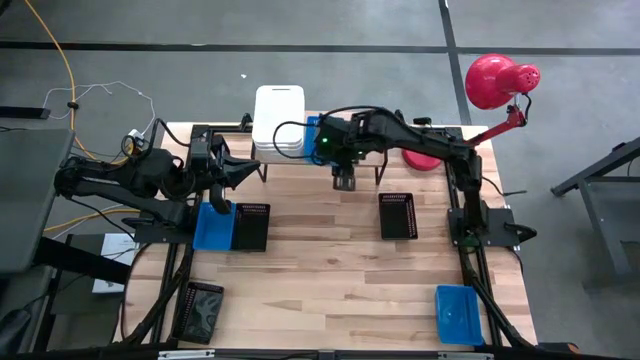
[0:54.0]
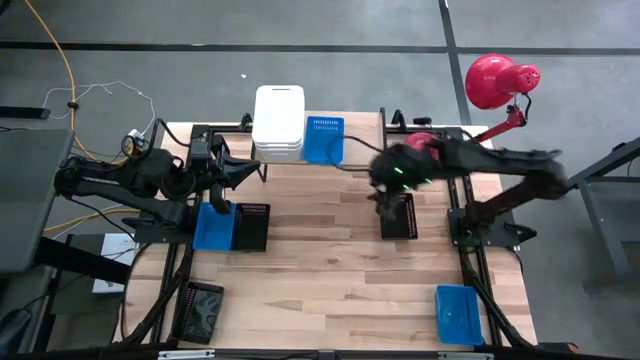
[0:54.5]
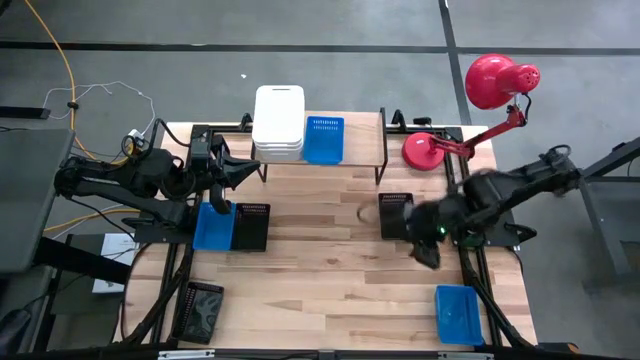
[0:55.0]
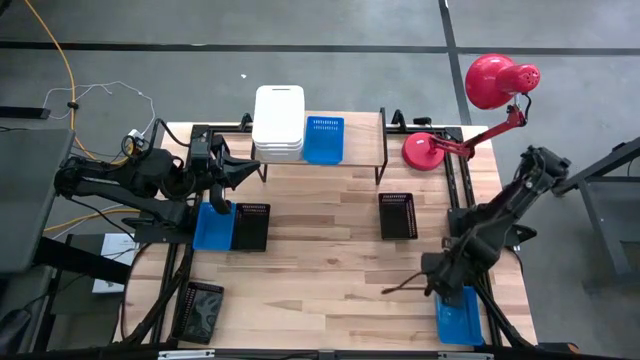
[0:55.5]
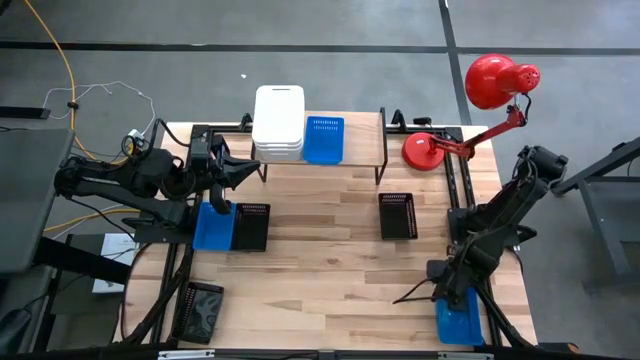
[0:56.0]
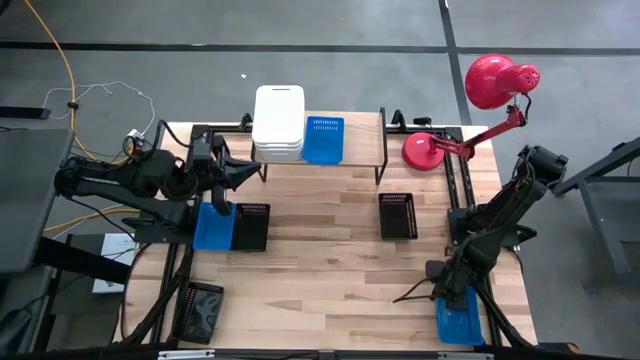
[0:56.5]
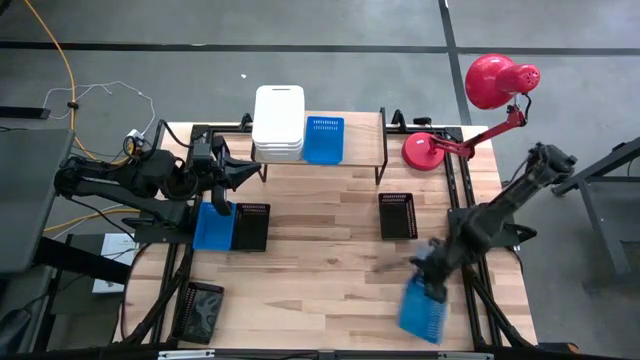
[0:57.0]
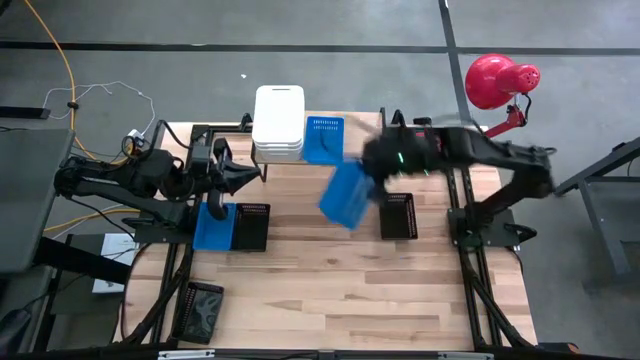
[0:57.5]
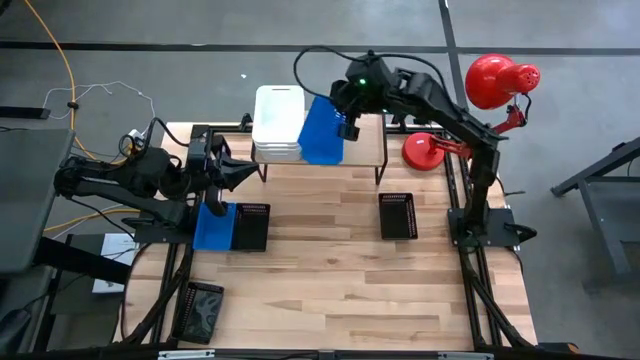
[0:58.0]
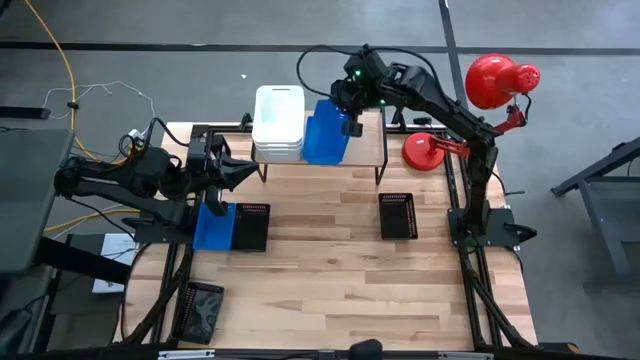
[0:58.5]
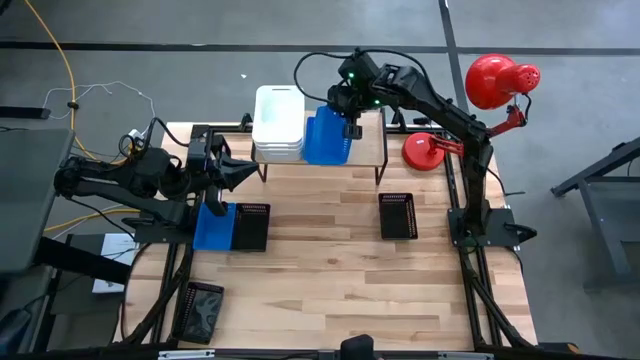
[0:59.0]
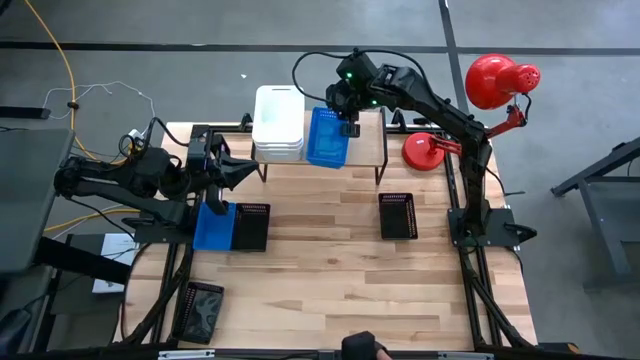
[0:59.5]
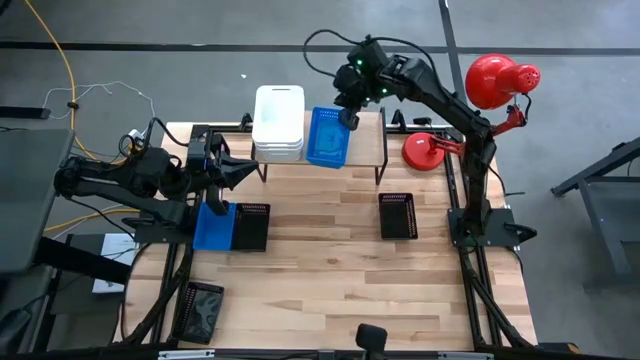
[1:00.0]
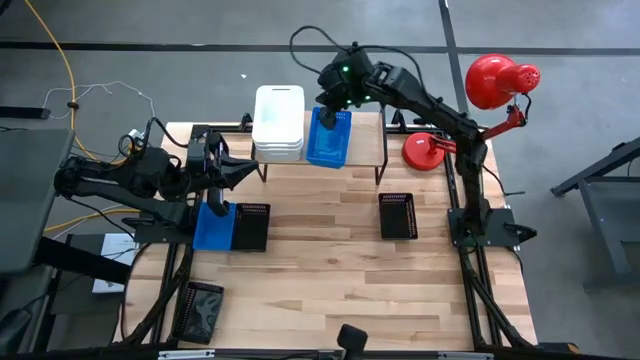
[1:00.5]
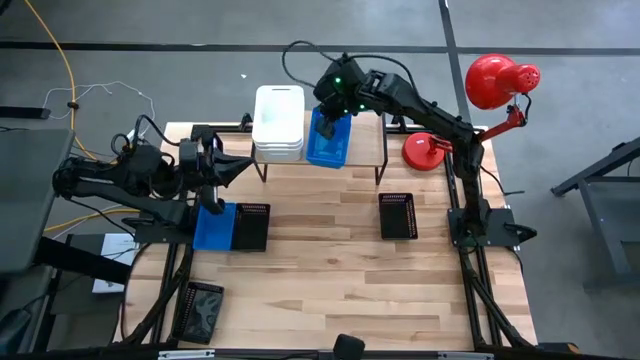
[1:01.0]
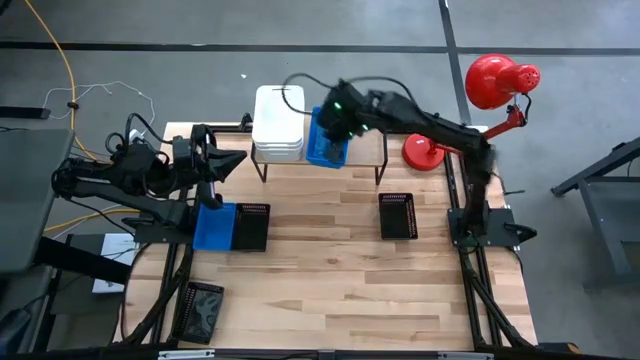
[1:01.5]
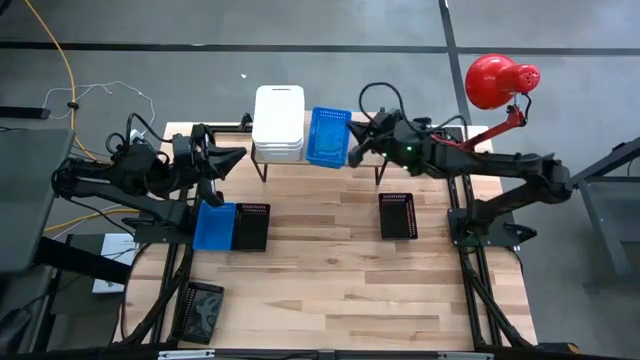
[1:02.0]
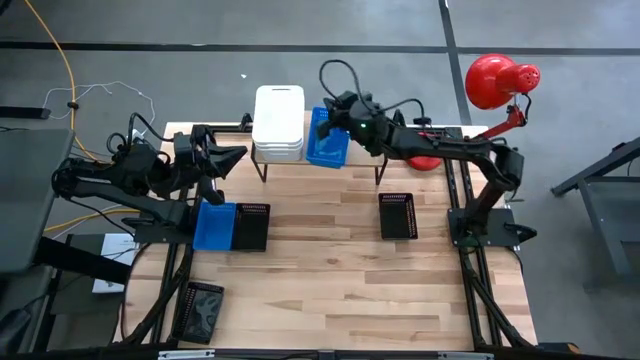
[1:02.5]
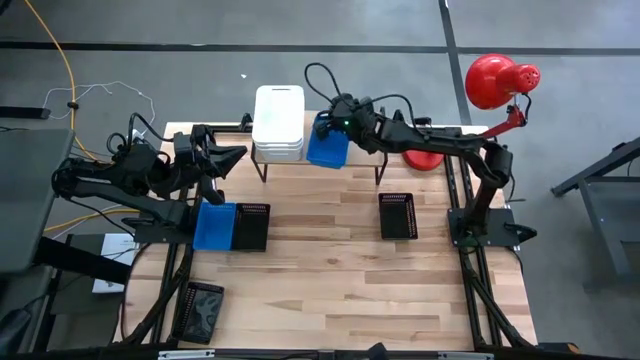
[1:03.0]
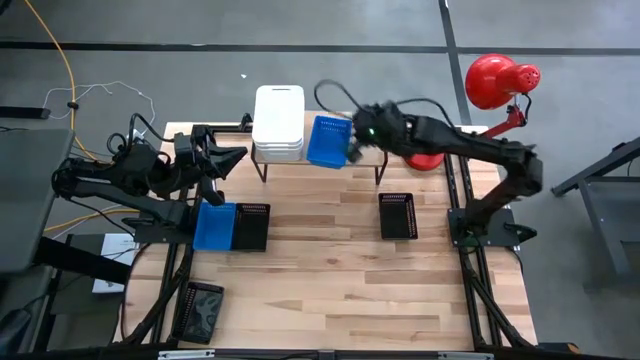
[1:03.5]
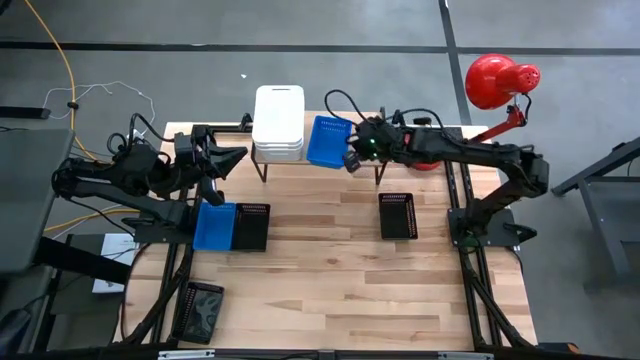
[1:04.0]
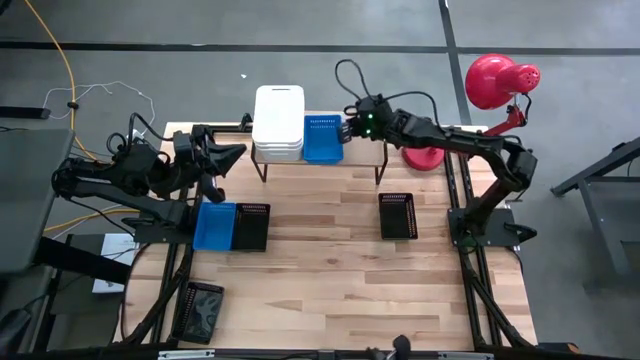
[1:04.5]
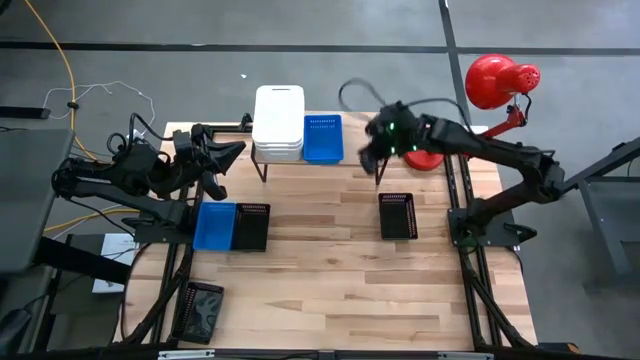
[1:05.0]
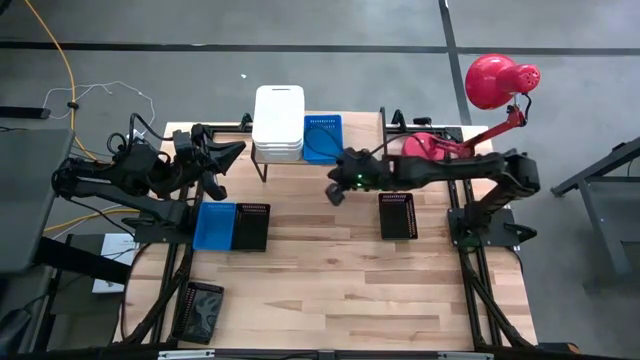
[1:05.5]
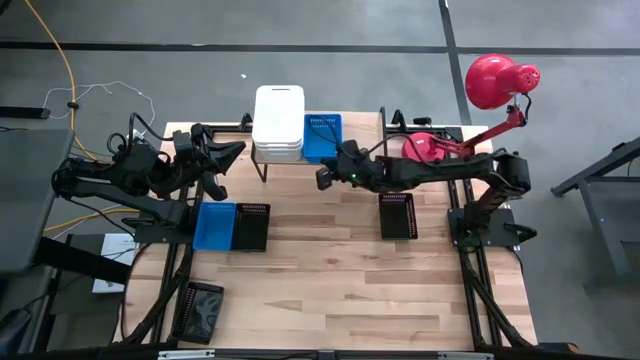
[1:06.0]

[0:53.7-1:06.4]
Task: Stack baskets on shelf by color
Stack the right blue bin on top of the blue bin on the shelf

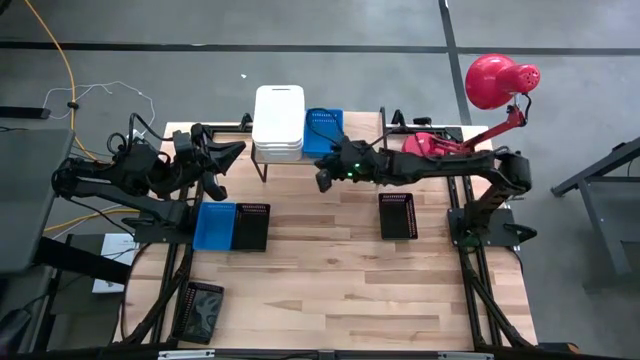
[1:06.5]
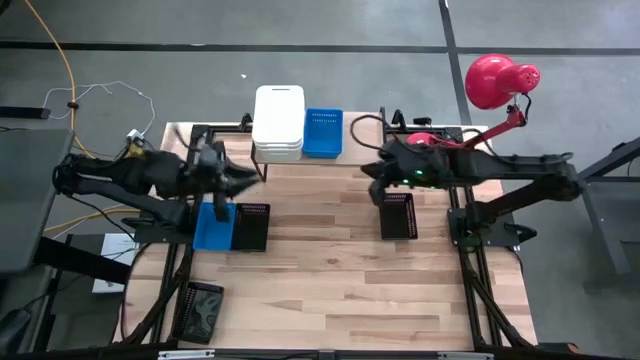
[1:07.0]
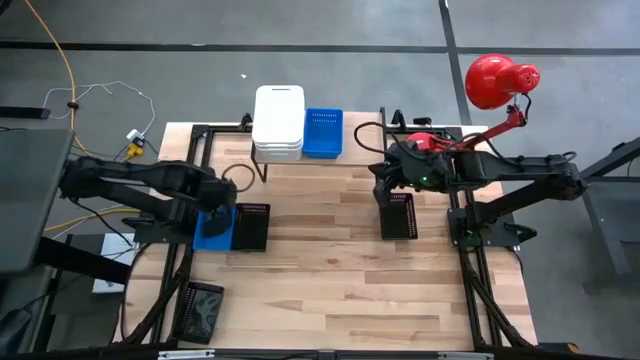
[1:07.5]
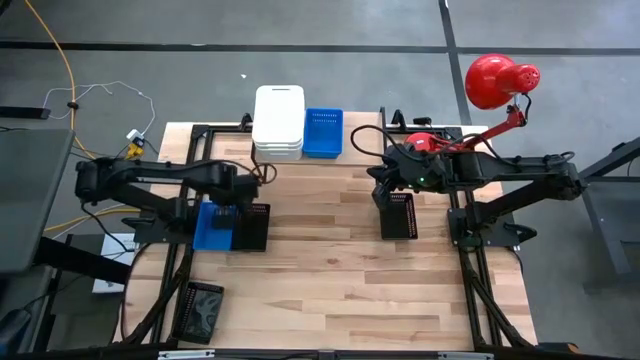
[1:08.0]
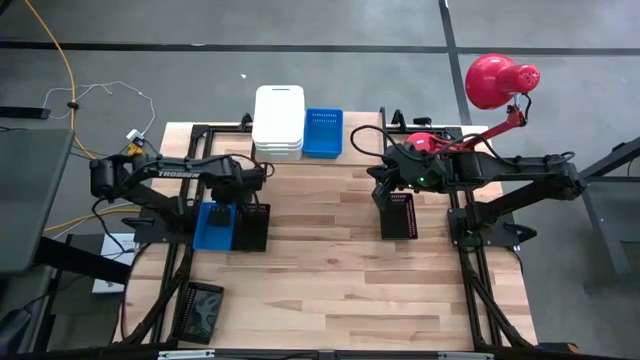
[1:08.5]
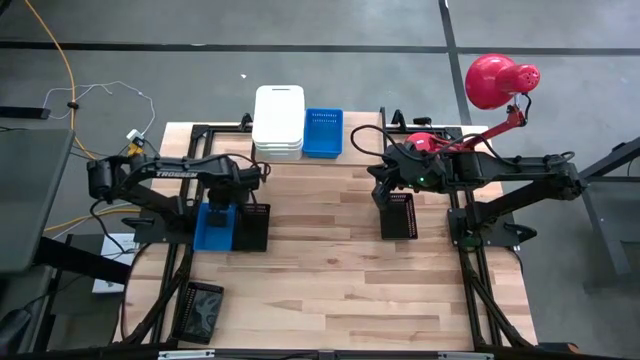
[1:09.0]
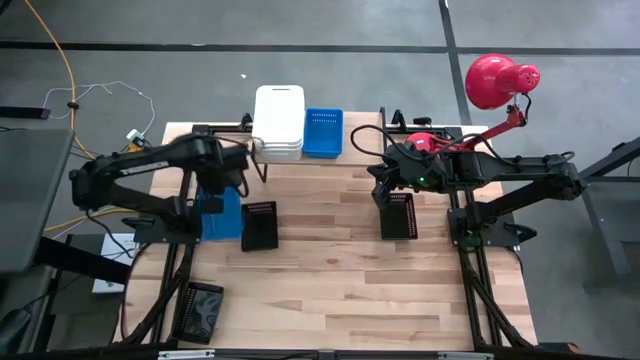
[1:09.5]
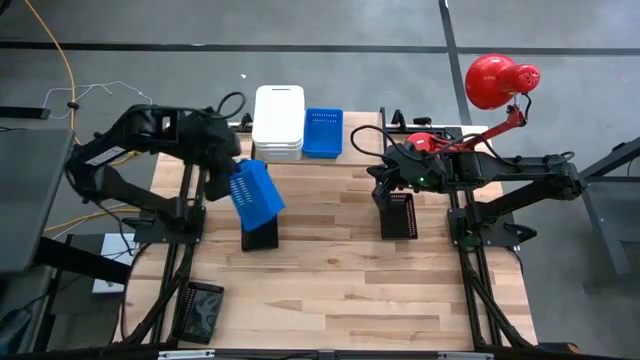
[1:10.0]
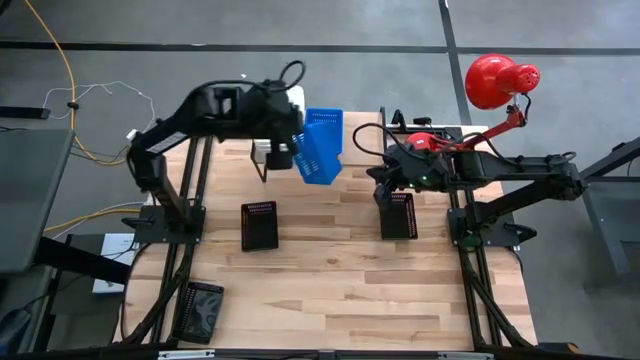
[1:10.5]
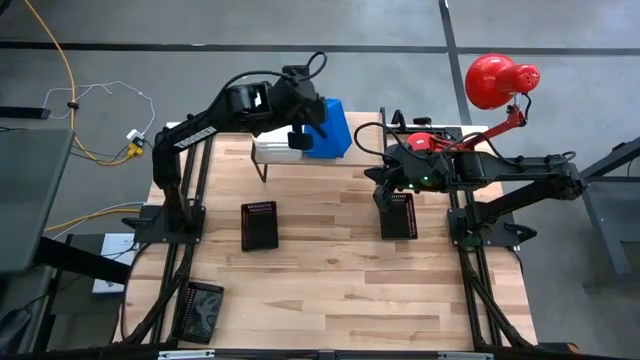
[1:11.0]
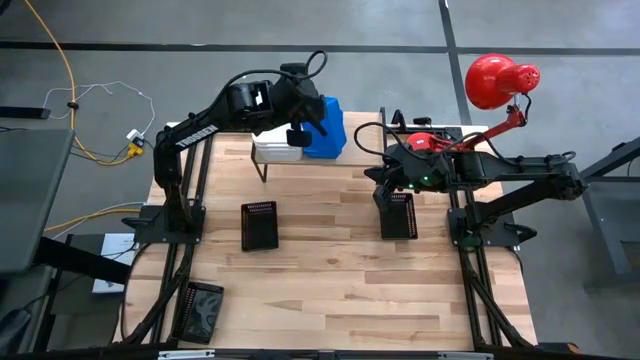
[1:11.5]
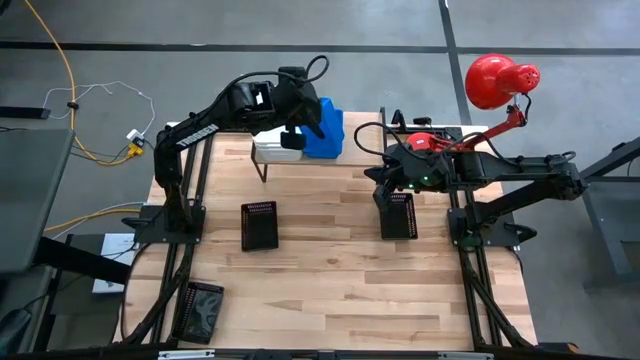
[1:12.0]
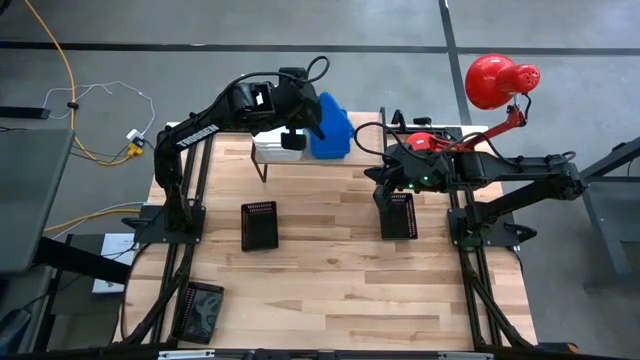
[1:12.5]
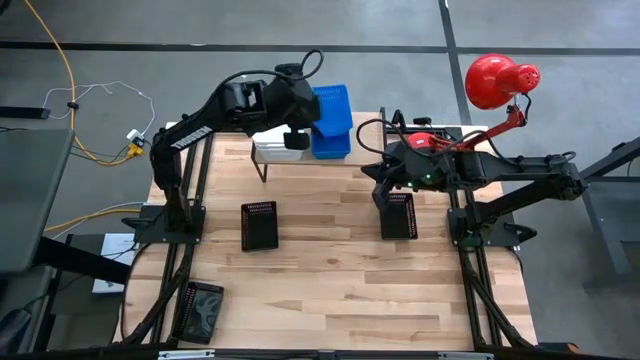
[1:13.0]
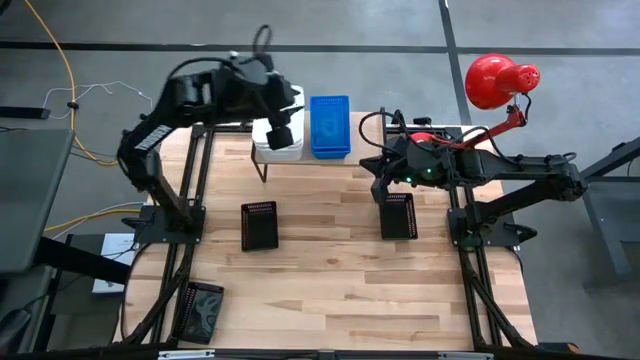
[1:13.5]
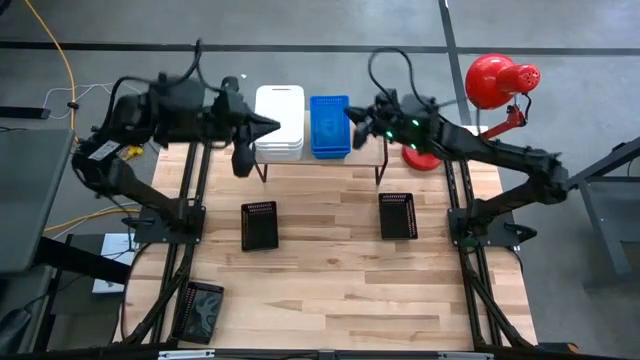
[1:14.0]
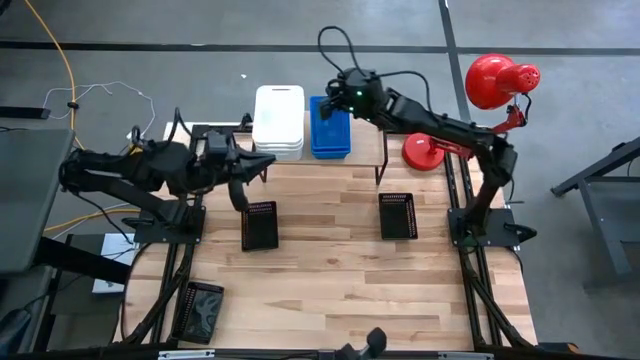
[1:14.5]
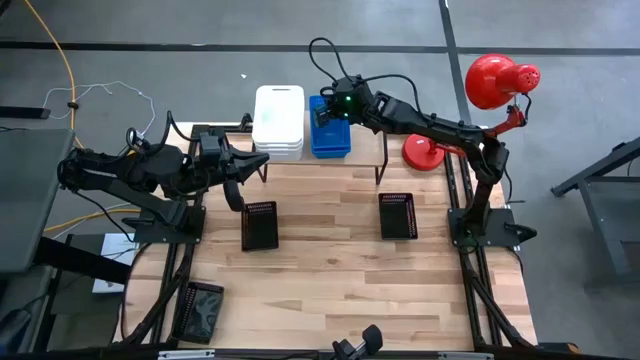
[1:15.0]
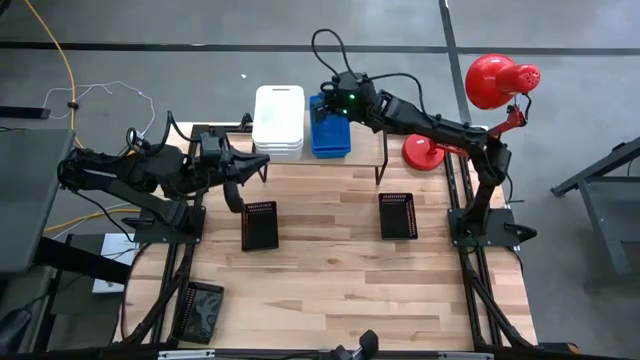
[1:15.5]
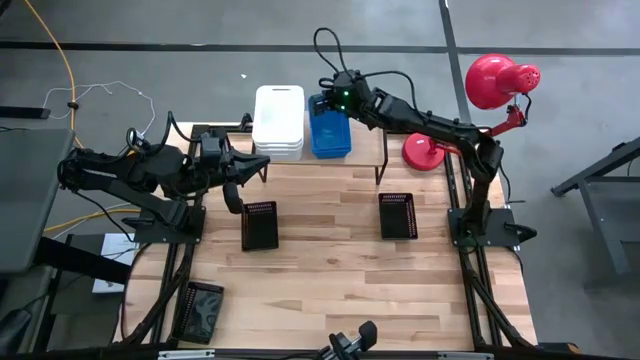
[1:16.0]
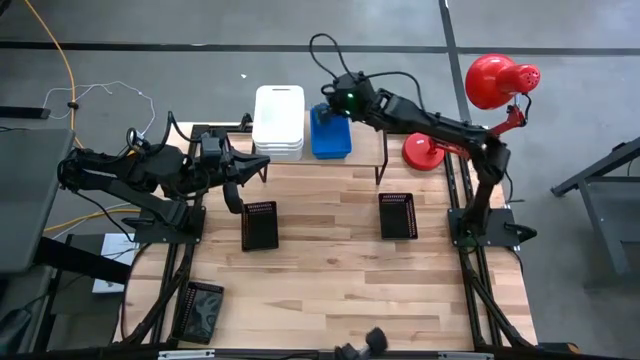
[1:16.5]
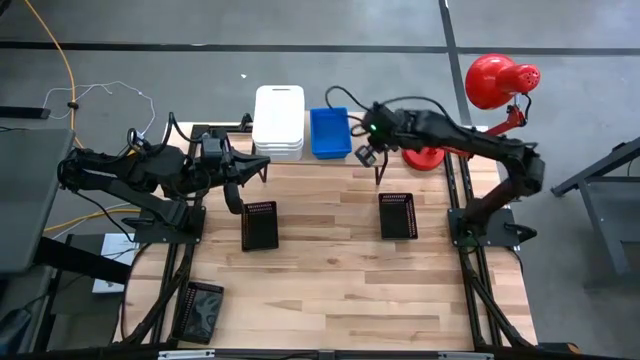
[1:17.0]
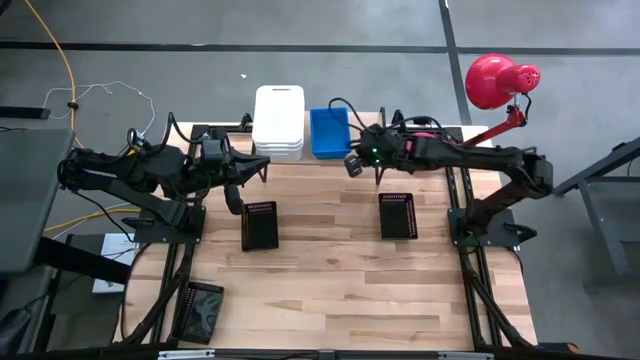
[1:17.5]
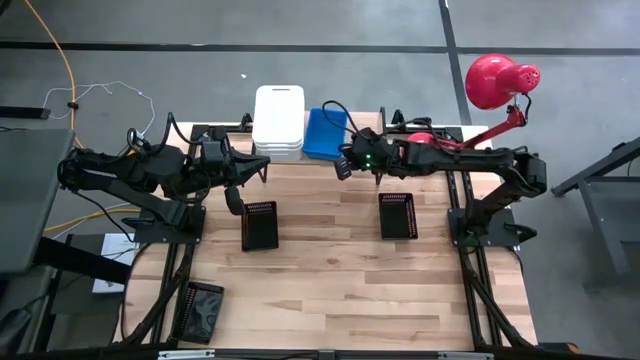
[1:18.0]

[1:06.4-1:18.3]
Stack the blue bin on top of the blue bins on the shelf
